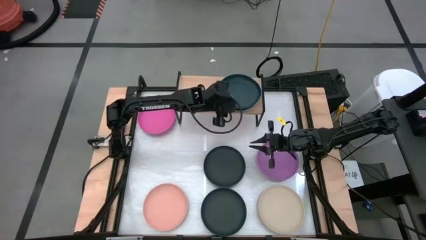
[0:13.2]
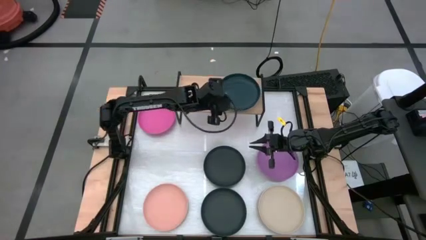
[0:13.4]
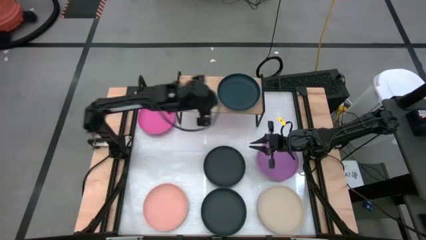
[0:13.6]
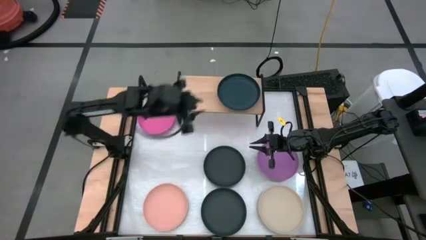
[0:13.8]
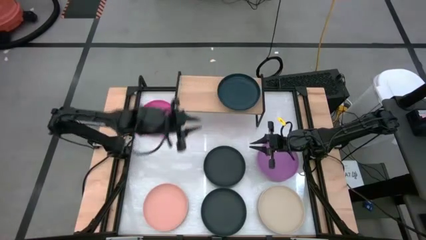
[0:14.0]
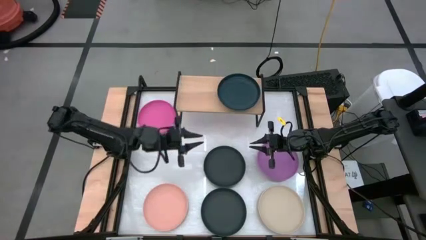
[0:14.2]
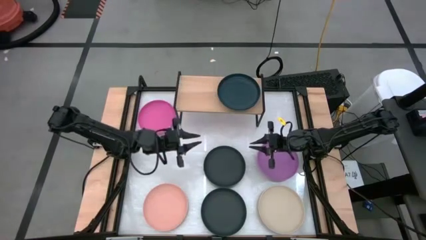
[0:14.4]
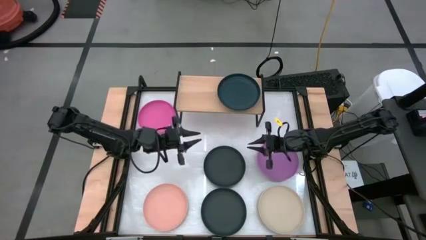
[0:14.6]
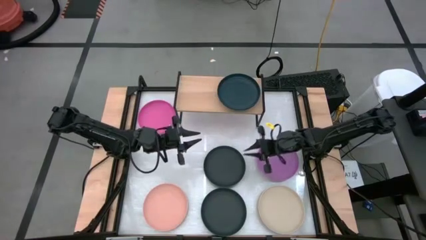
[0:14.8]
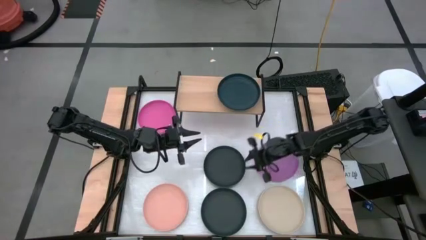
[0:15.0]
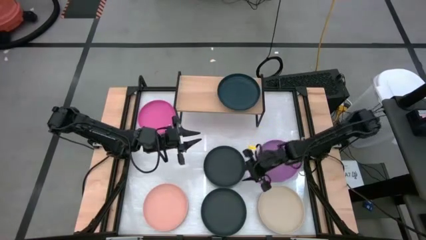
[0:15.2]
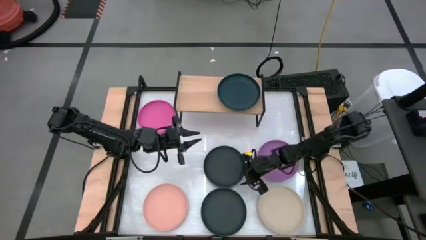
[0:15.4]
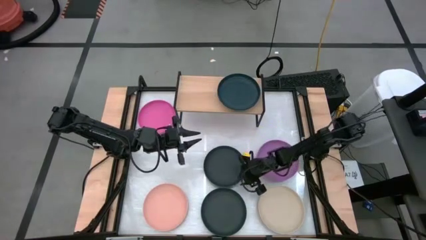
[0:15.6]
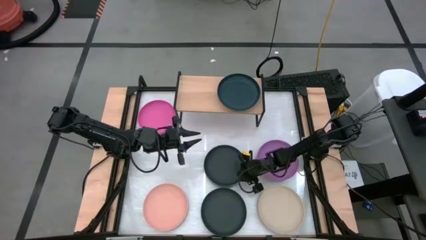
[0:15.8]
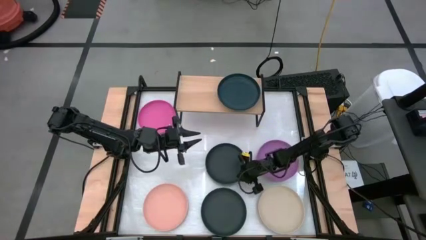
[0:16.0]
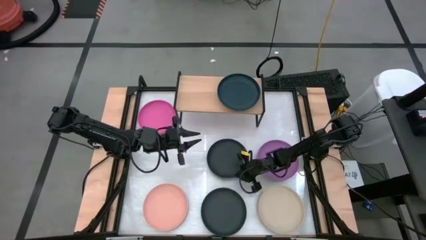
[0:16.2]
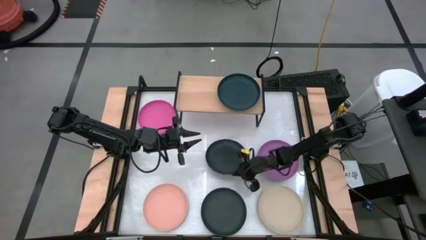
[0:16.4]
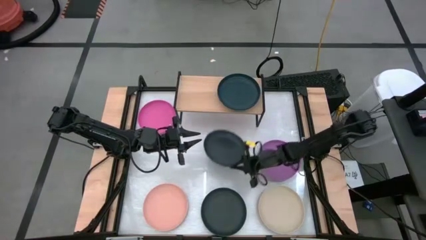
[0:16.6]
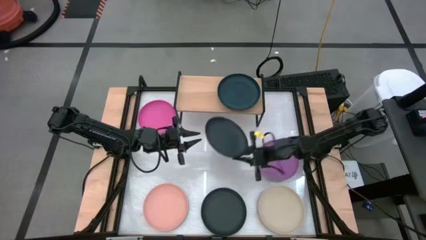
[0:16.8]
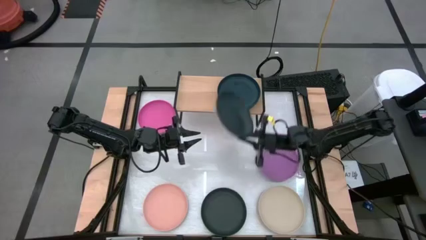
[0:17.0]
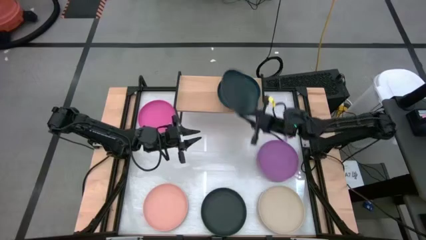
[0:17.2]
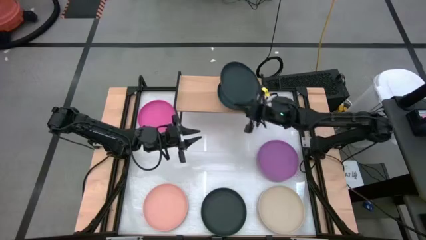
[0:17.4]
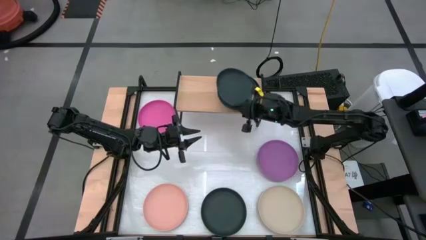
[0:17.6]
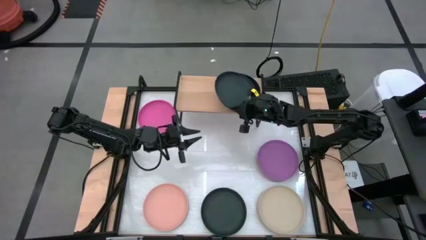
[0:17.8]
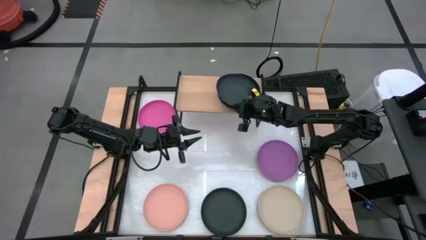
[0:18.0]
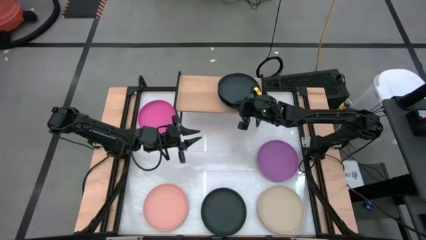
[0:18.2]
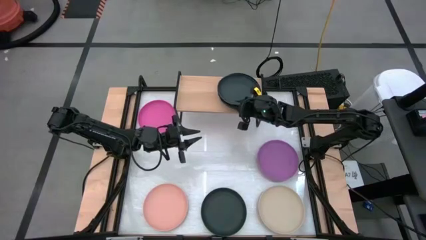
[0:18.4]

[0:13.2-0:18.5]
Task: Place and stack plates onto a shelf
Stack the top black plate on the green plate

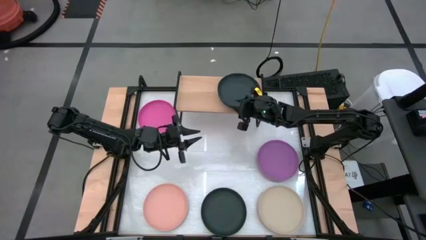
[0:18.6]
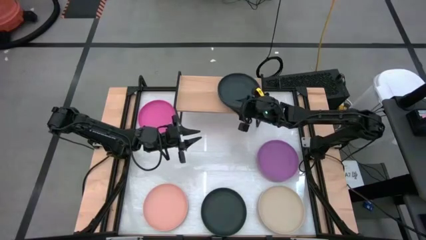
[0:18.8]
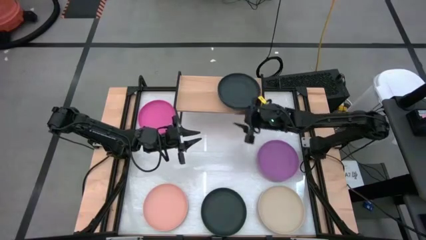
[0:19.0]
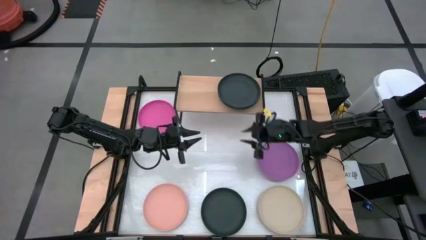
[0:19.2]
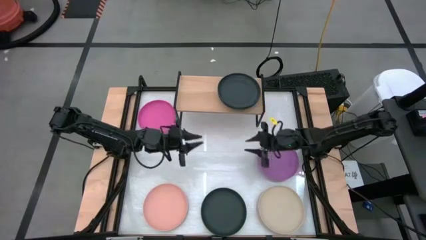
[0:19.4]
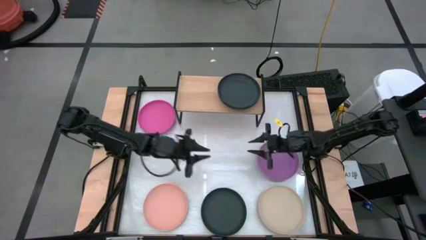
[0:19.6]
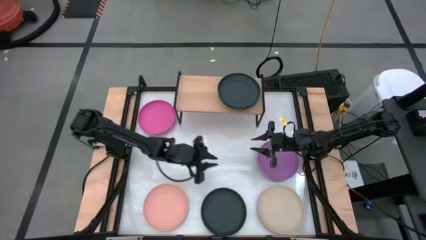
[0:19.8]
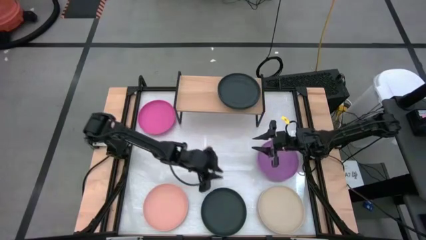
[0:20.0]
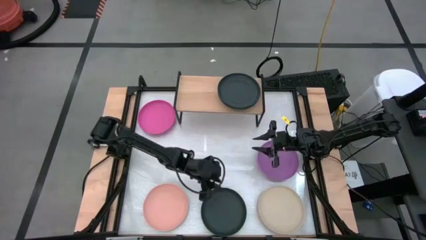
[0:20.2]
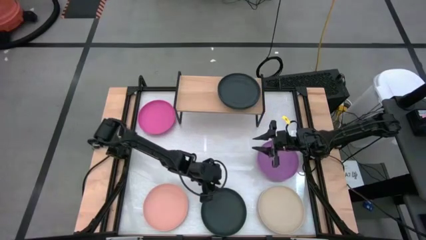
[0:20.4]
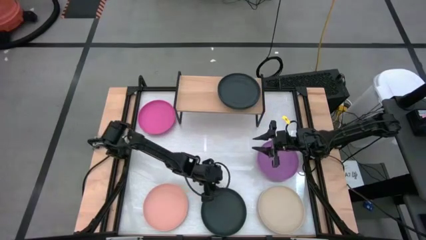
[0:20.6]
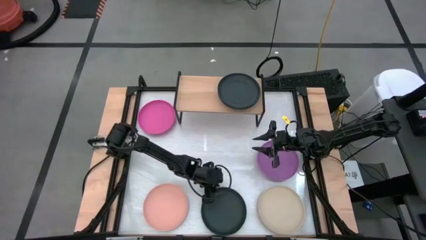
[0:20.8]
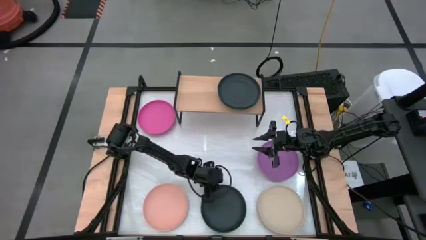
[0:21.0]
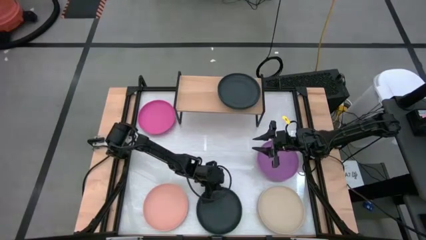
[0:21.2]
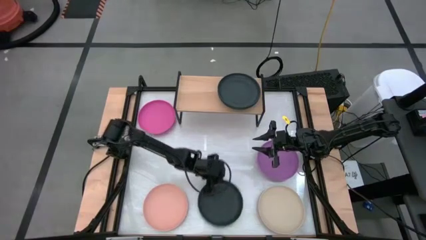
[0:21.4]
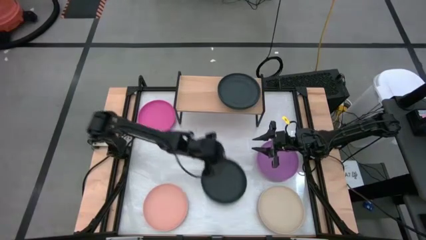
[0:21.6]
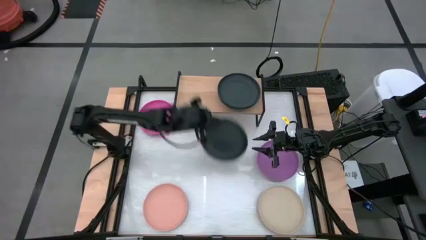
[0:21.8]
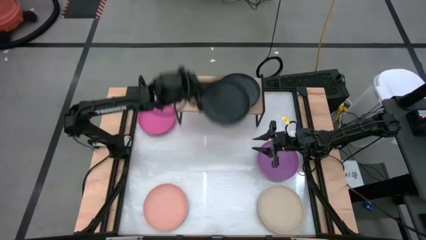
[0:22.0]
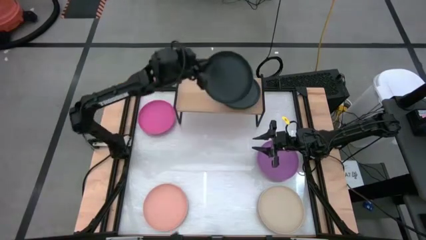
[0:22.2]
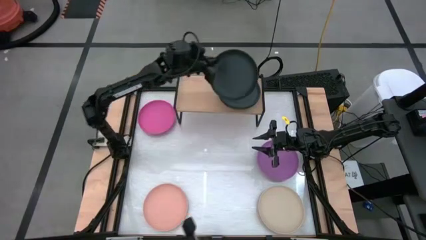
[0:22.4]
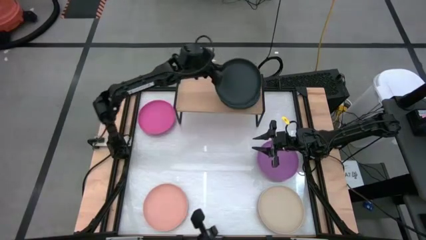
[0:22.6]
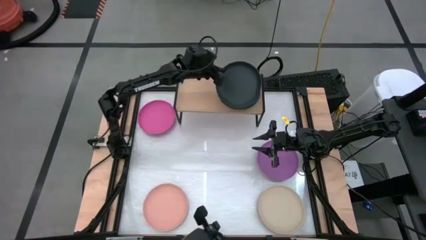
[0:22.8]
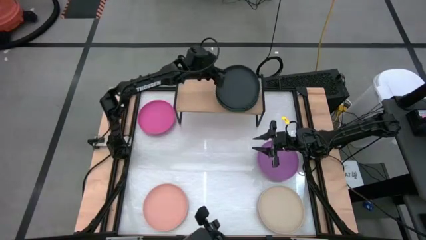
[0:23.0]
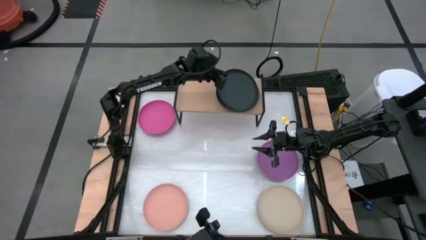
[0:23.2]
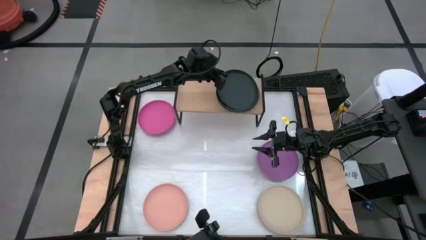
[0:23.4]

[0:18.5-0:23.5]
Stack the black plate on the black plate

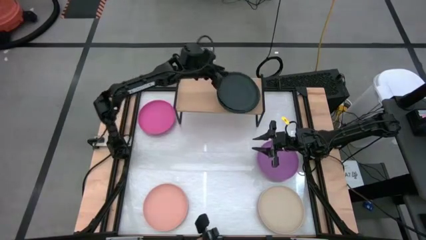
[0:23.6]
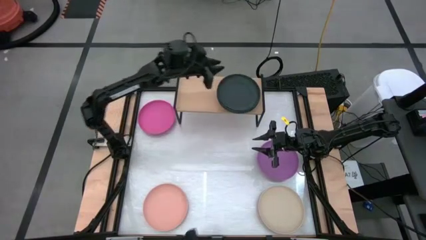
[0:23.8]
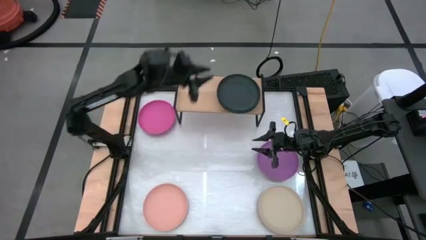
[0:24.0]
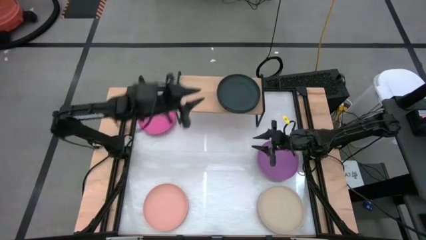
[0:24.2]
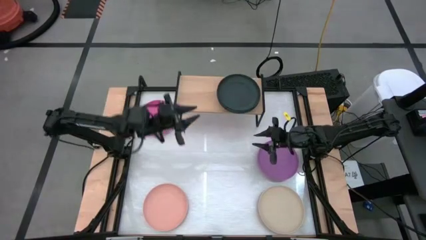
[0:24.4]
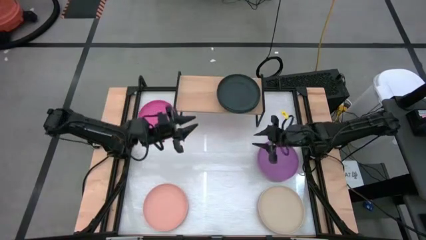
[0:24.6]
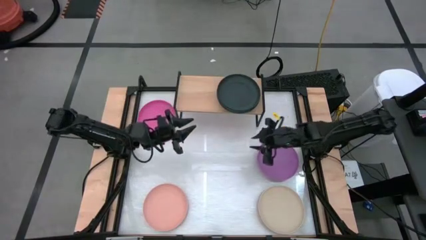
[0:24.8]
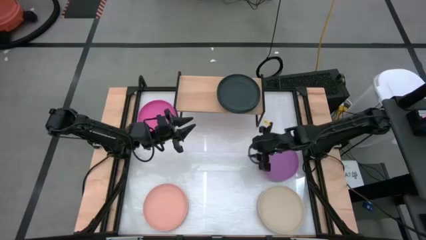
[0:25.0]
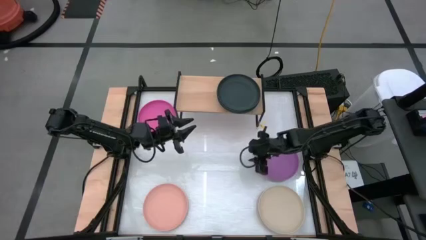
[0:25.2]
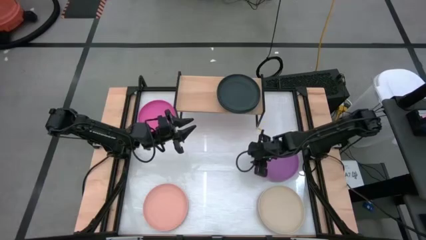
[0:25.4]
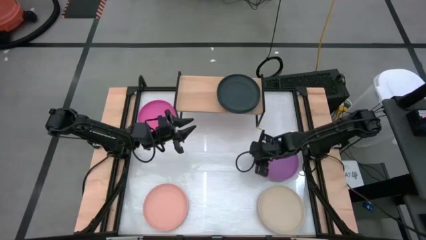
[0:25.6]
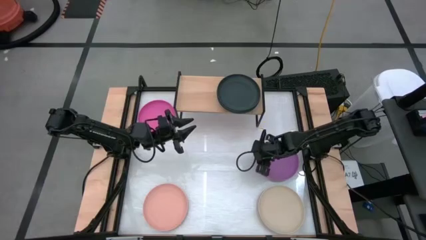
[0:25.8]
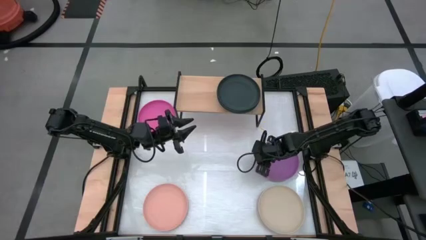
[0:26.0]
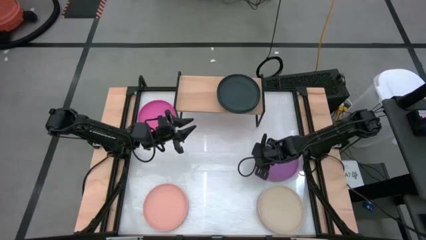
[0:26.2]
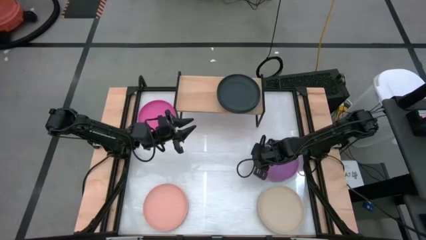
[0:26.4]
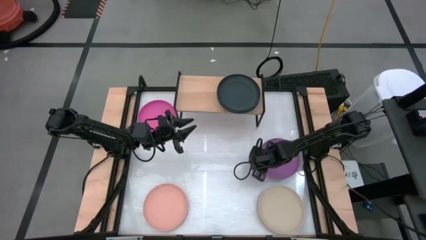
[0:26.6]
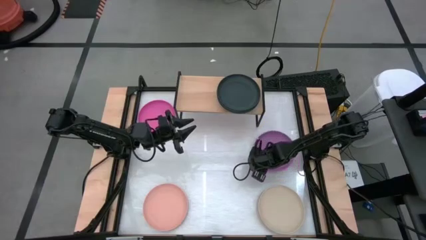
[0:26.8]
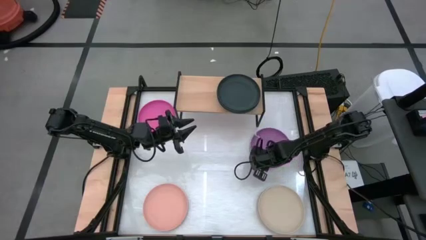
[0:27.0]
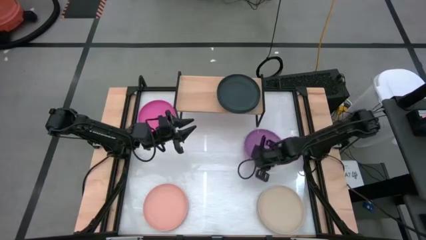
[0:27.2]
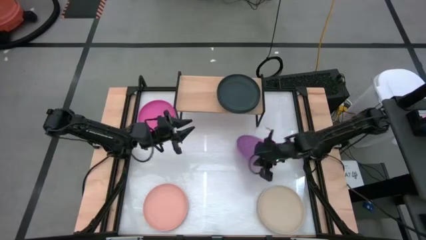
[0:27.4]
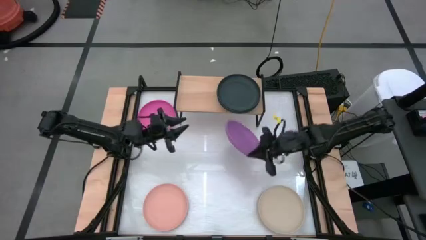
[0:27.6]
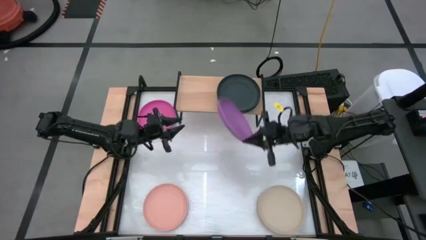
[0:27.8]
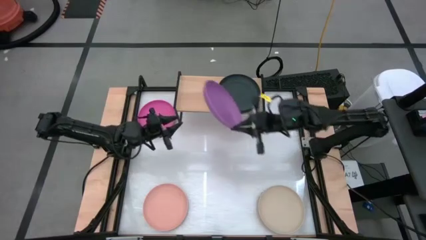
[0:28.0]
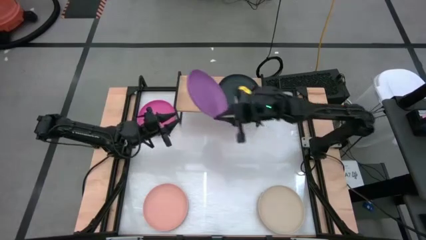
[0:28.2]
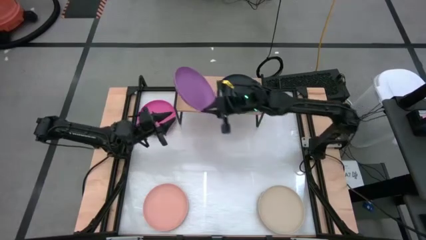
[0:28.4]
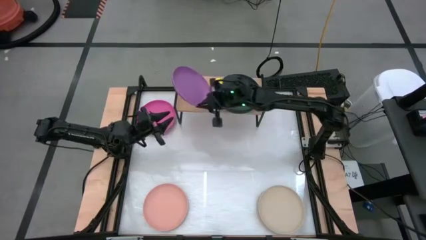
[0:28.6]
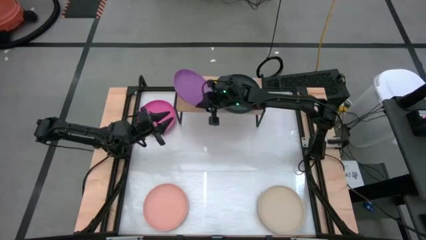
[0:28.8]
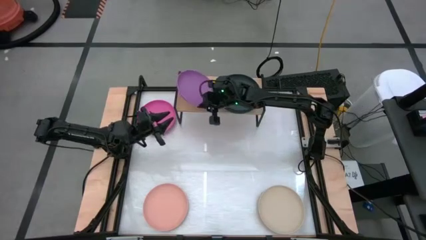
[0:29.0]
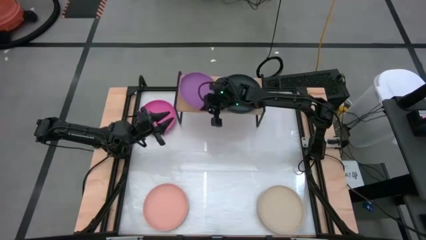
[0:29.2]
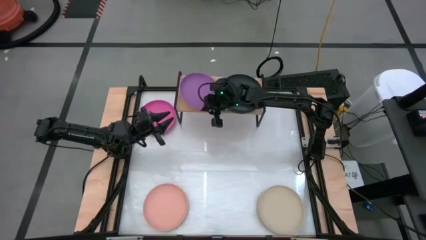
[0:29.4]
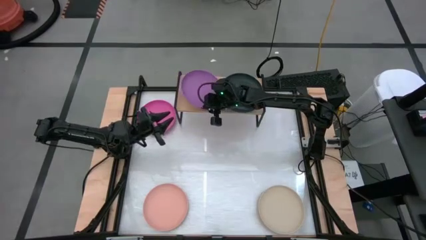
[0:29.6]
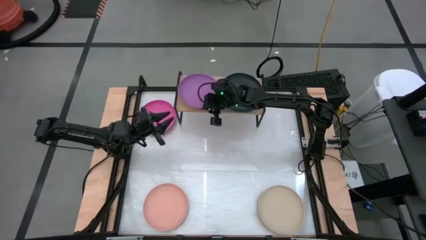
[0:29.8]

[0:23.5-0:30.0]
Put the purple plate on the shelf

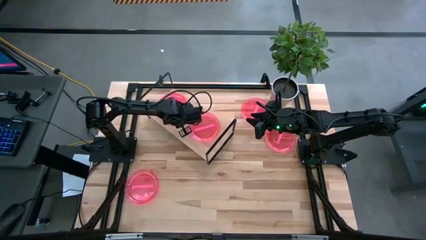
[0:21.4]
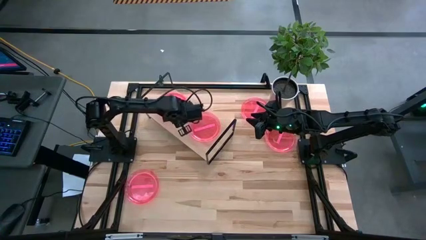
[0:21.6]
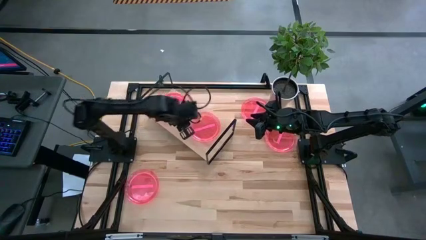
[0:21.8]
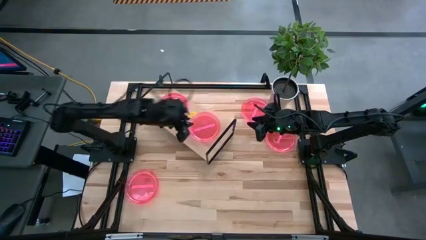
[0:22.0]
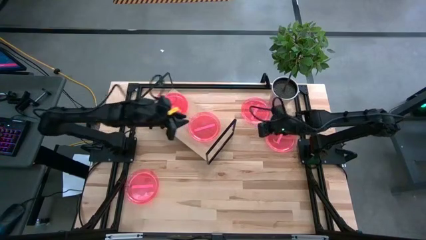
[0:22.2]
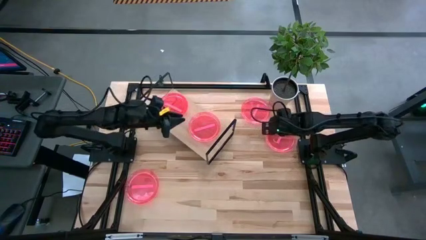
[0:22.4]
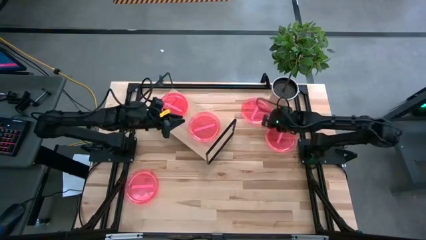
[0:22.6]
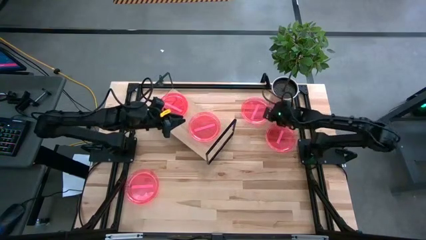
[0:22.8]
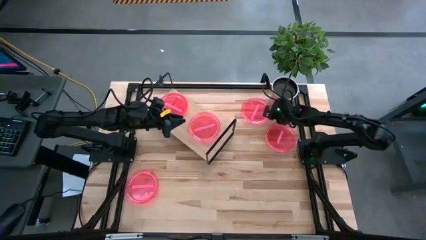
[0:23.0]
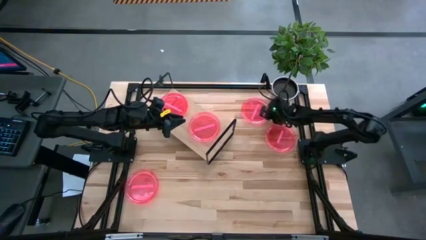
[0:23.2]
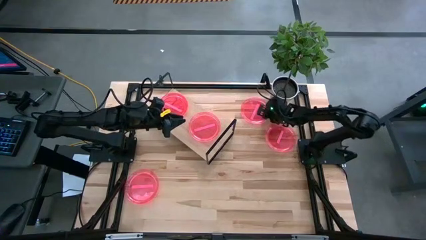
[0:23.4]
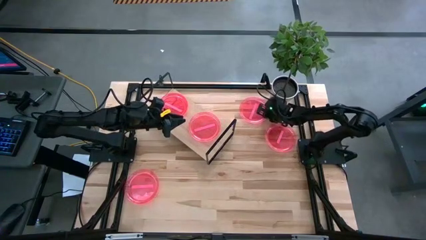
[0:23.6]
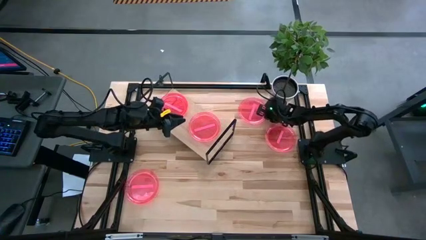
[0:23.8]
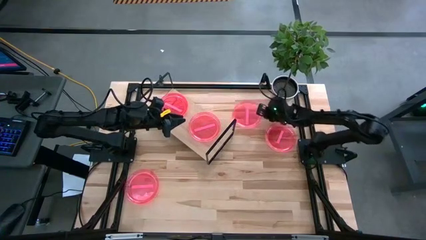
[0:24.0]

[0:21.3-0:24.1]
Task: Place and stack plates onto a shelf
Stack the pink plate on top of the right pink plate on the shelf
